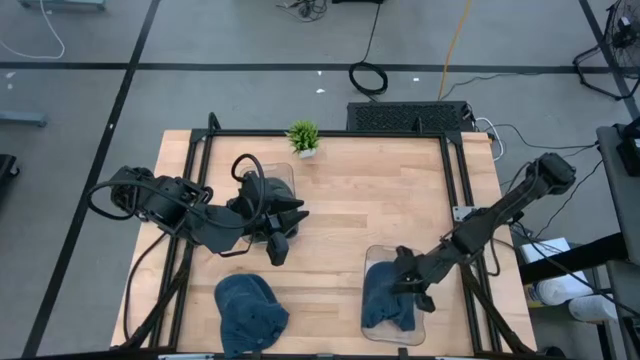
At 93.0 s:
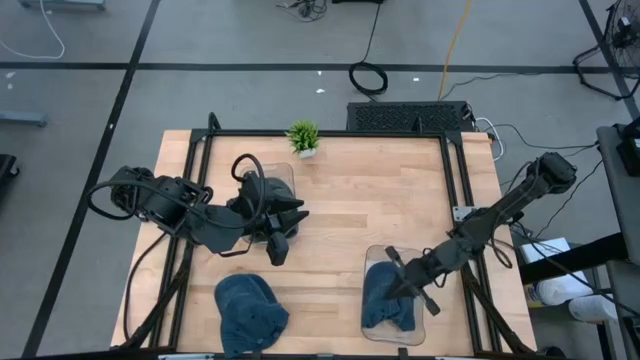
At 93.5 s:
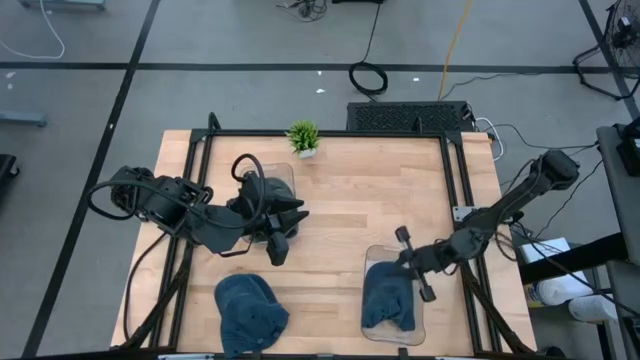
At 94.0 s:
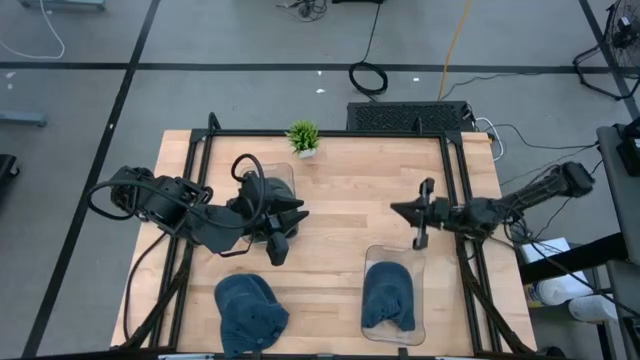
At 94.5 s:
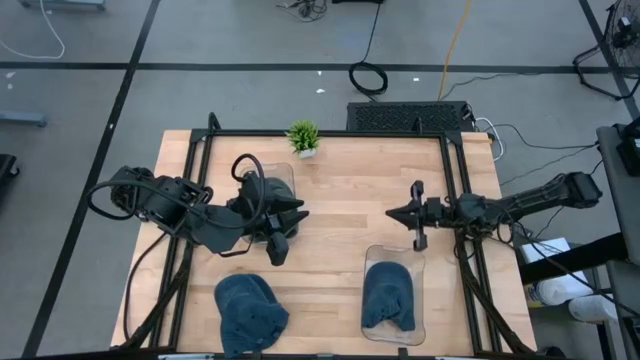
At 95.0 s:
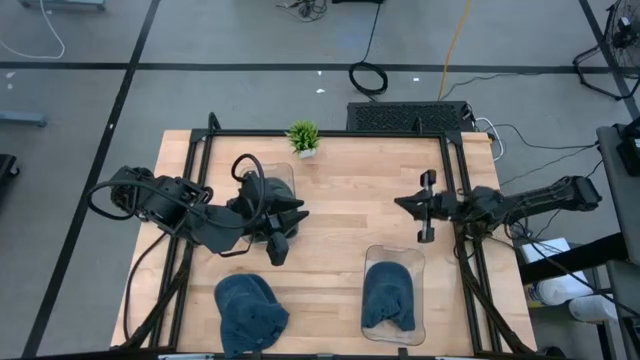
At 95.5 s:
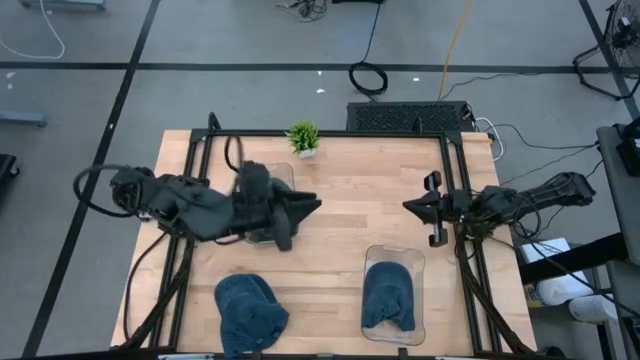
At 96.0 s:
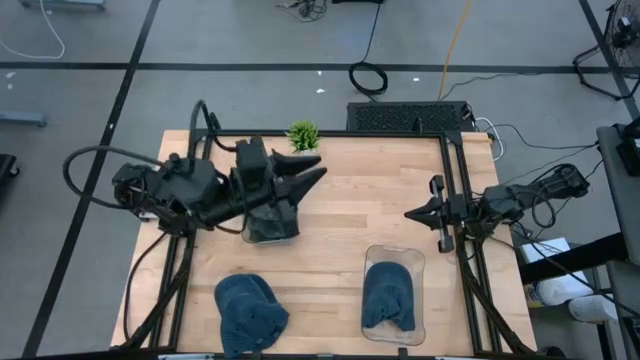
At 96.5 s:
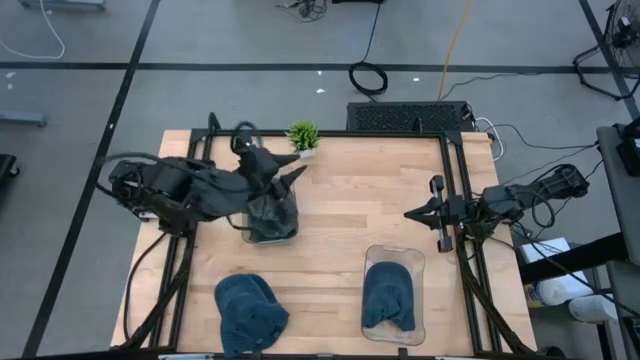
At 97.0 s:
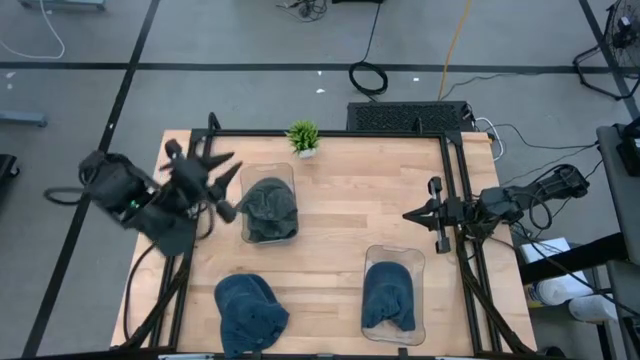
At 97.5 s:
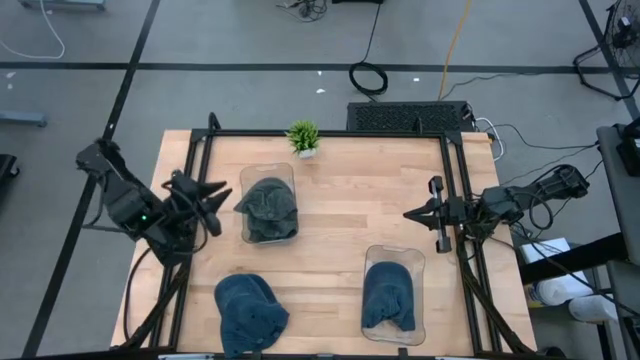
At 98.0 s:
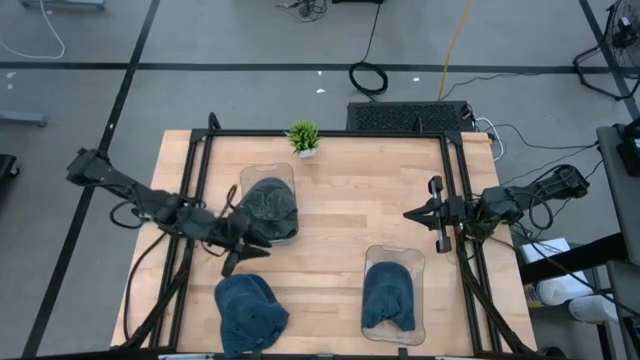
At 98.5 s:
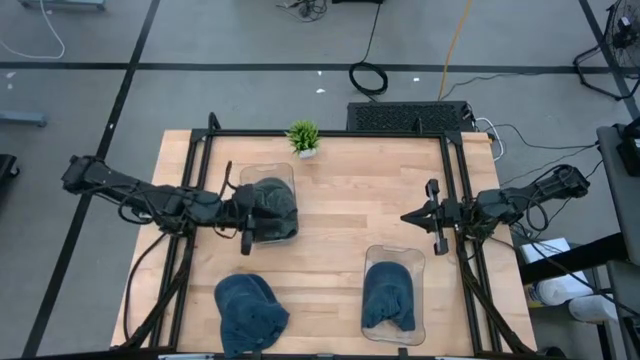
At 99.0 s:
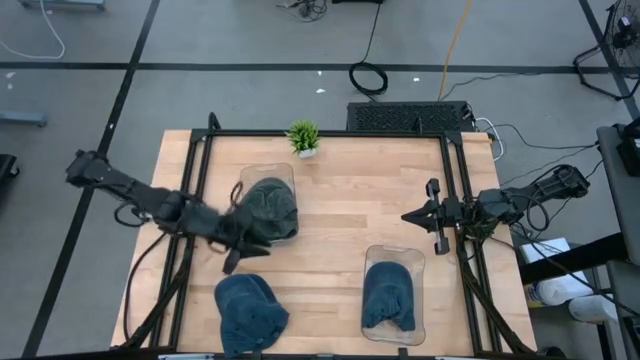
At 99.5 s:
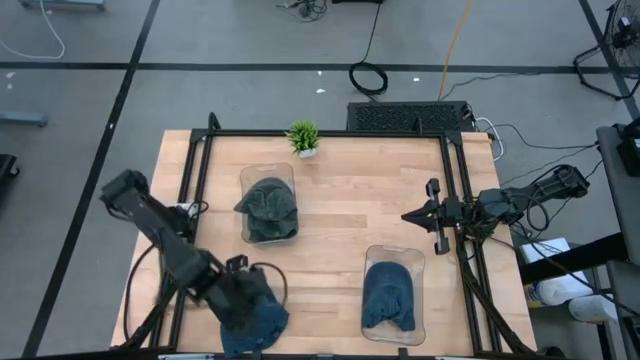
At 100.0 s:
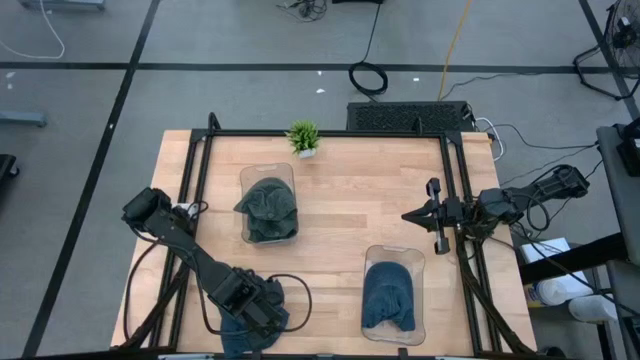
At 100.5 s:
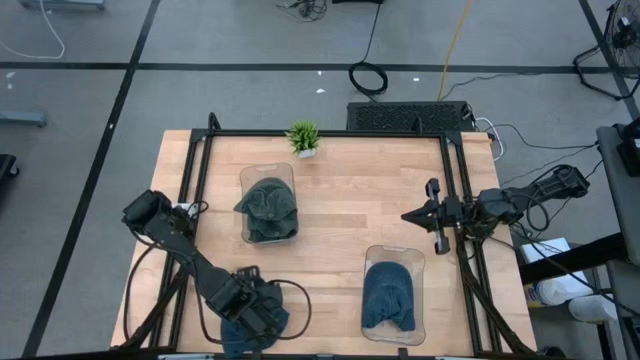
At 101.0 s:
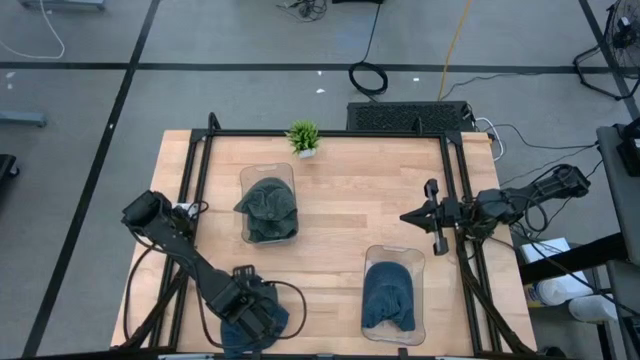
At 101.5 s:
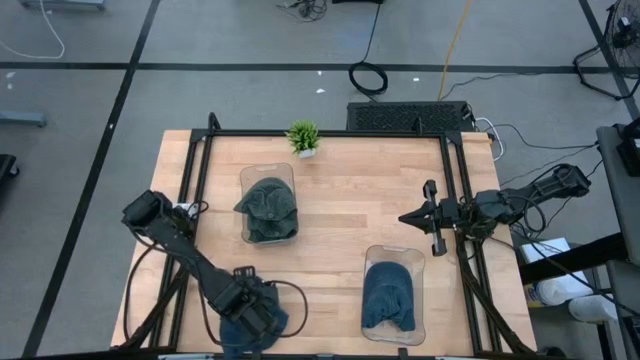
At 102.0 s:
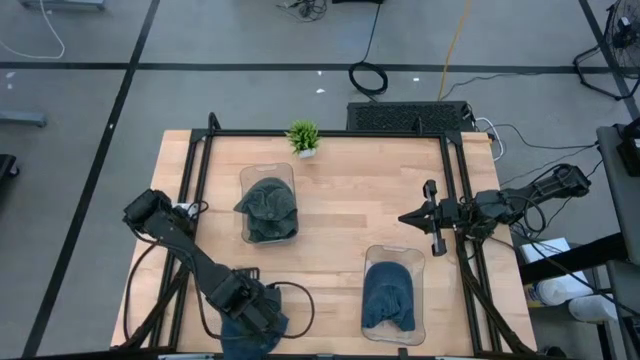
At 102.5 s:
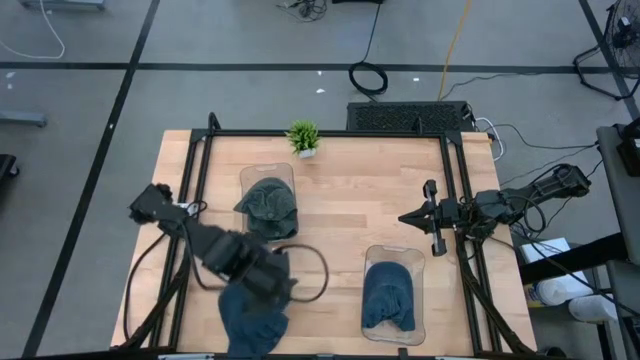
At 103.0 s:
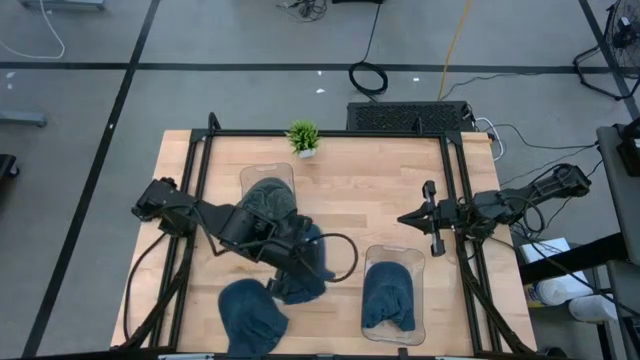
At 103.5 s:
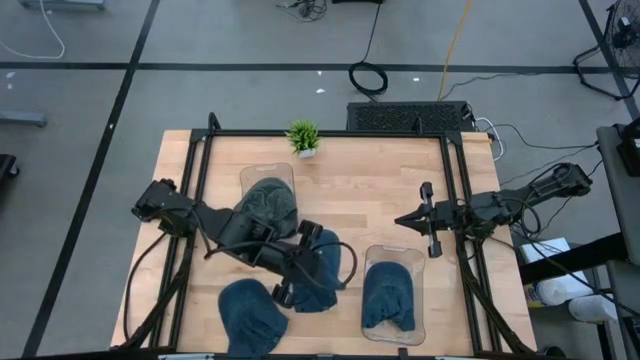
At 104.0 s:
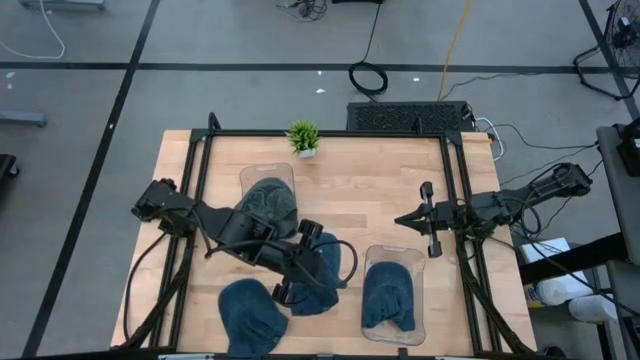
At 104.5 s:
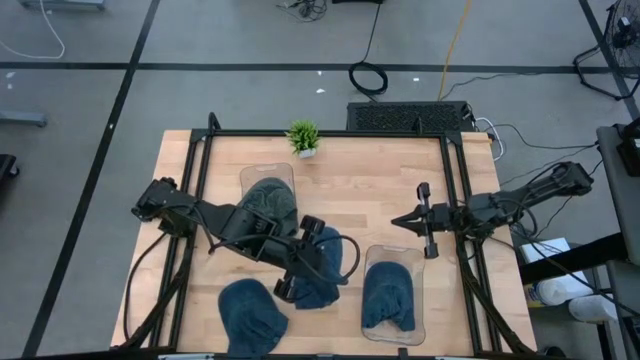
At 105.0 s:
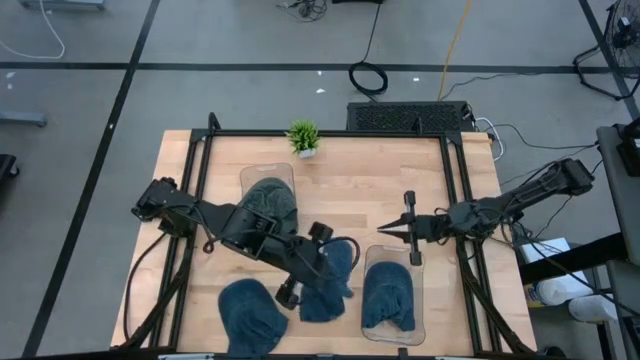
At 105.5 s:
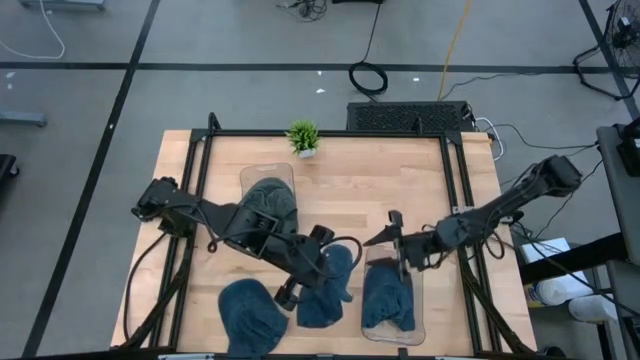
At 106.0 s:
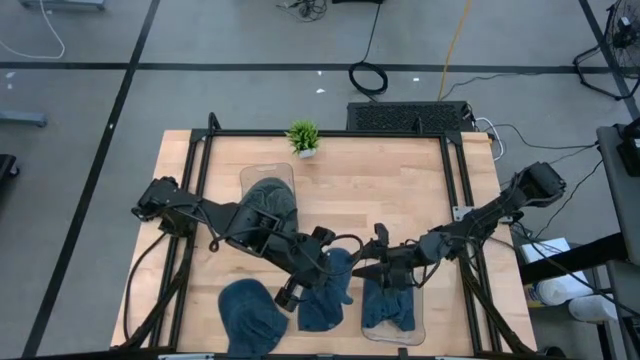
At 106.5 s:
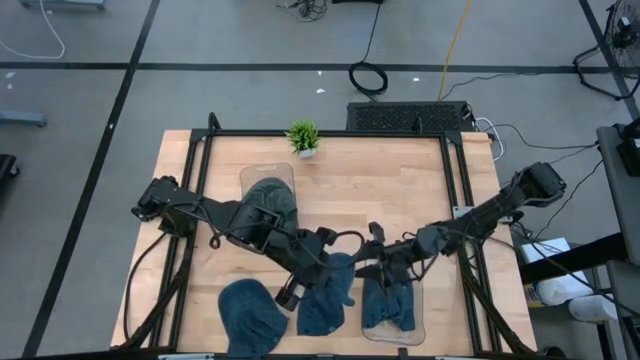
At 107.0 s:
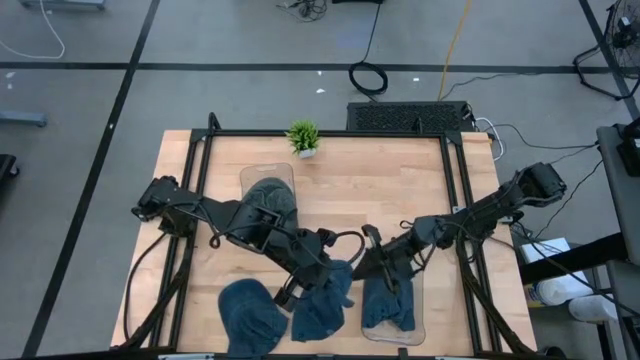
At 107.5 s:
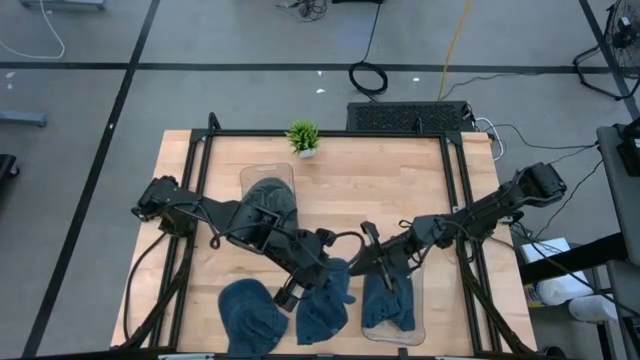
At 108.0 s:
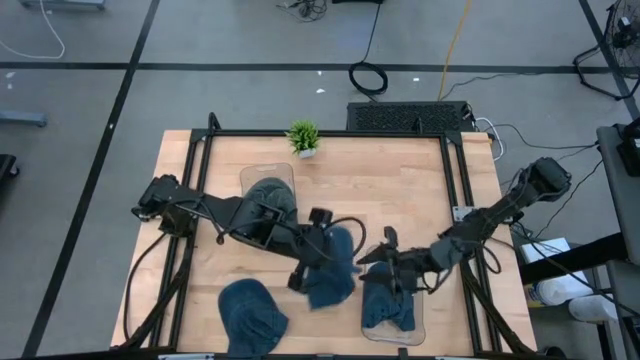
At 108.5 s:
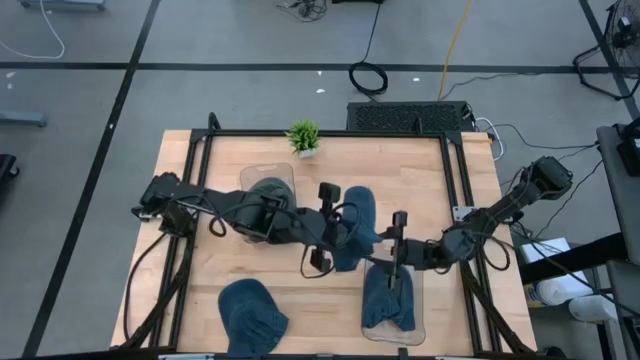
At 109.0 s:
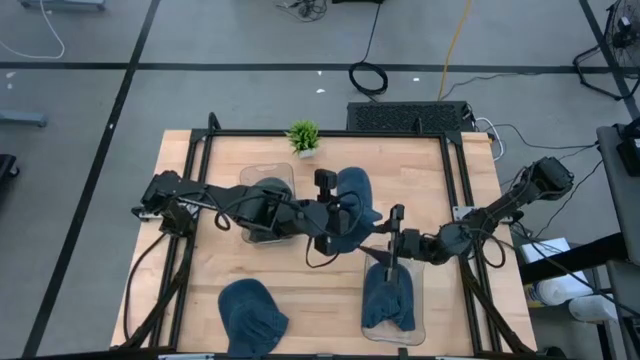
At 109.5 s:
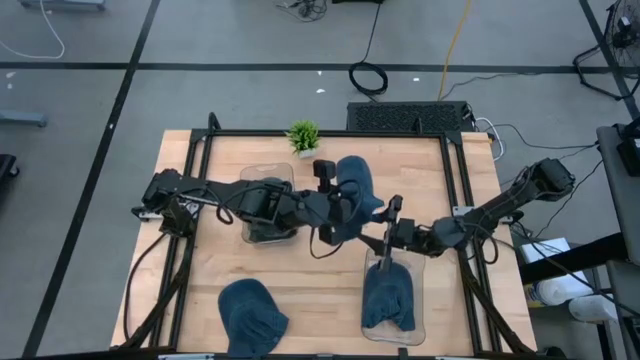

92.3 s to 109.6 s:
Task: Pick & Place hat
Put the blue cap into the bottom transparent bin

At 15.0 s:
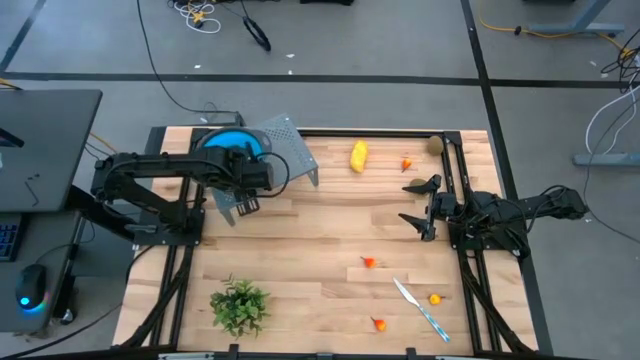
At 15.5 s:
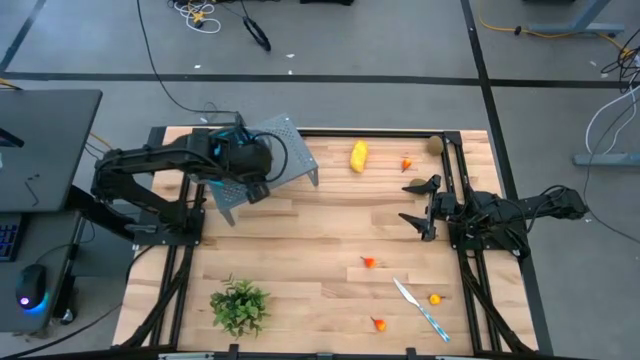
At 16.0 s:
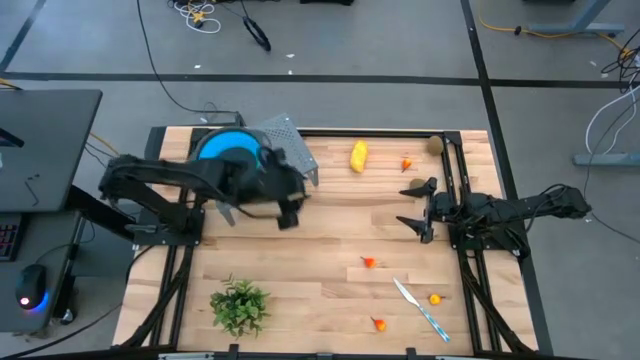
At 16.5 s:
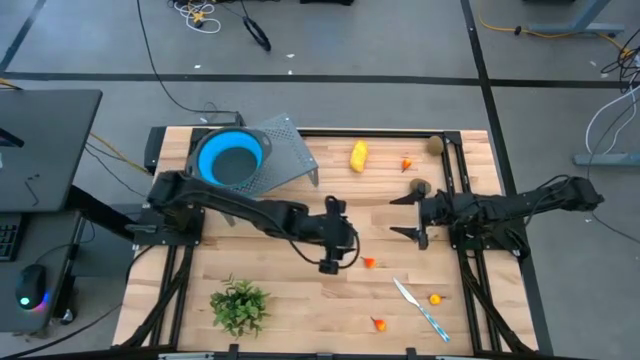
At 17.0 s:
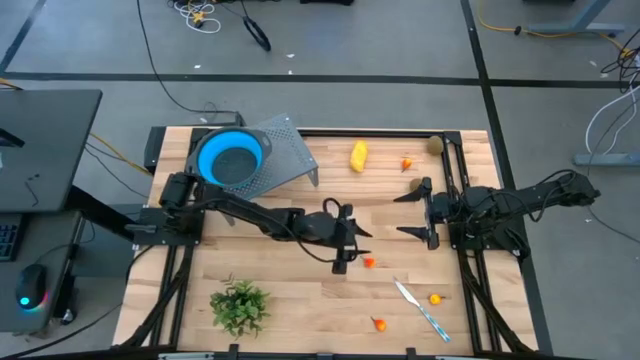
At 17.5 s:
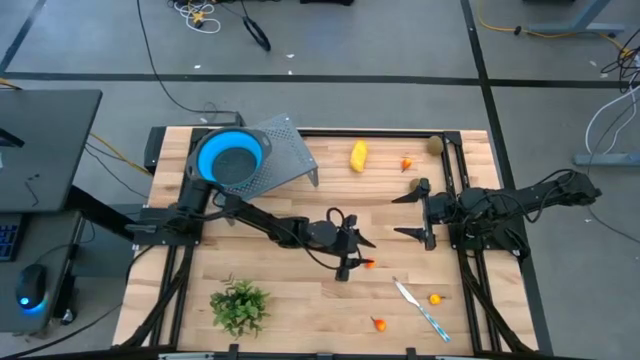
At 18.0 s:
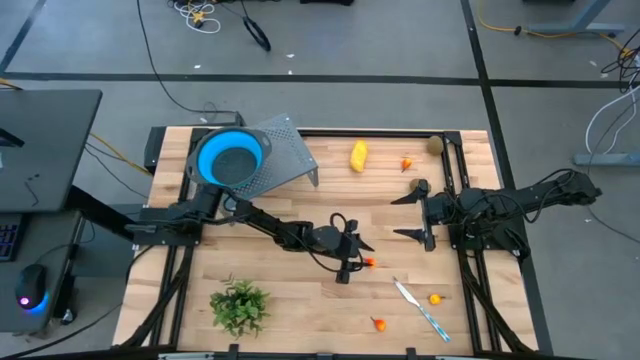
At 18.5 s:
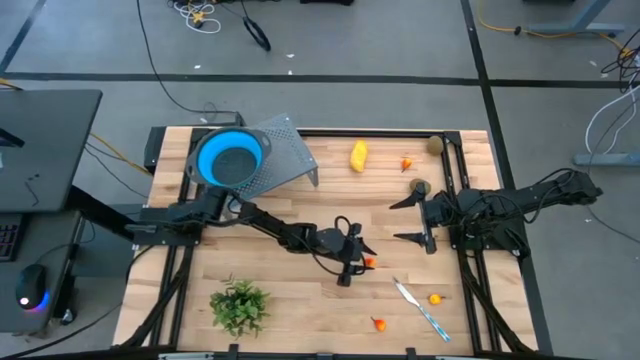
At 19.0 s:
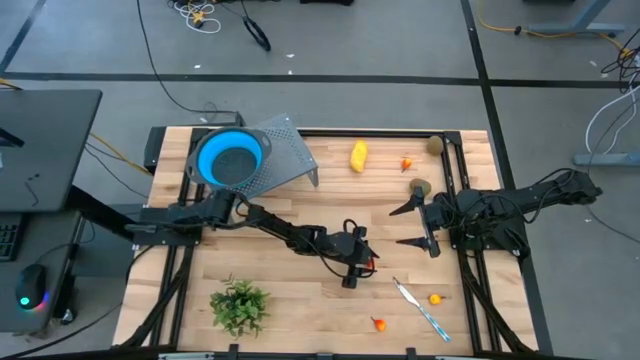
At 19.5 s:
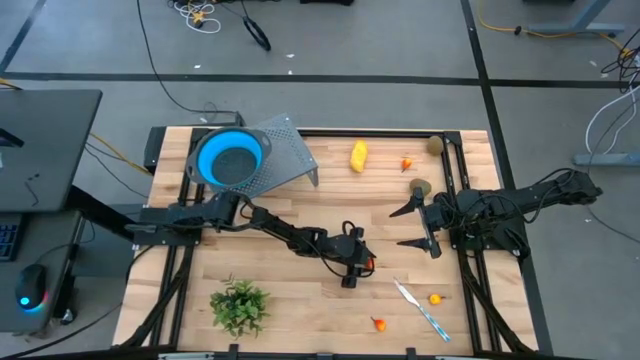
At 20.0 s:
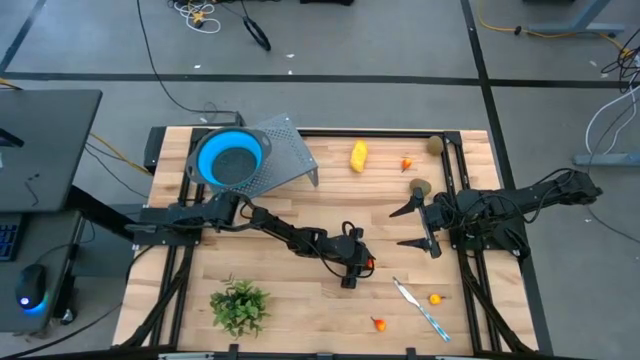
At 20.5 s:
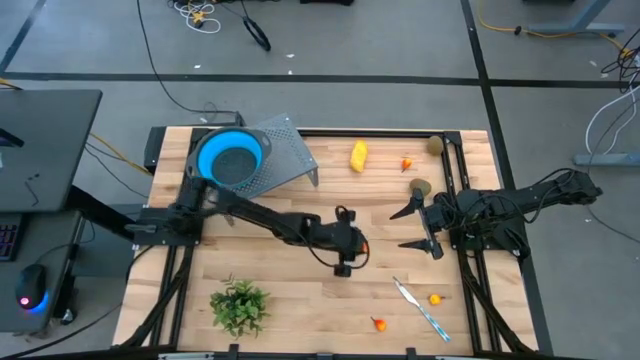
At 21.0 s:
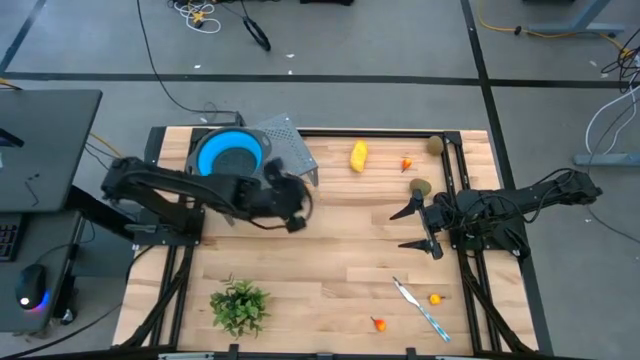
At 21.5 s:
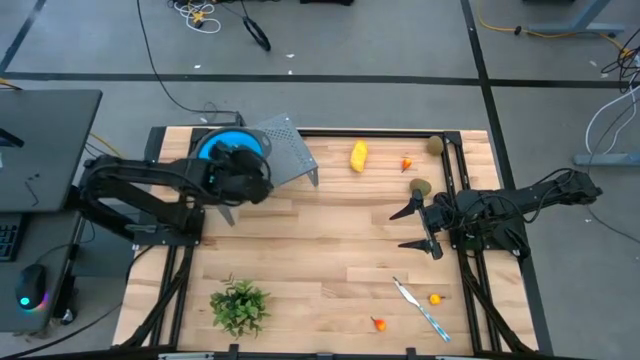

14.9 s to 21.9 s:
Task: Pick & Place Fruit
Put the yellow pear into the blue strainer bowl on the shelf
